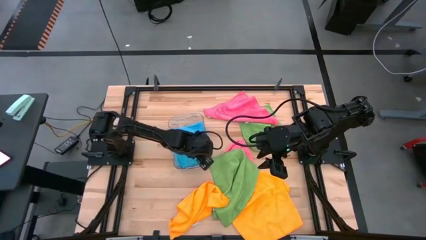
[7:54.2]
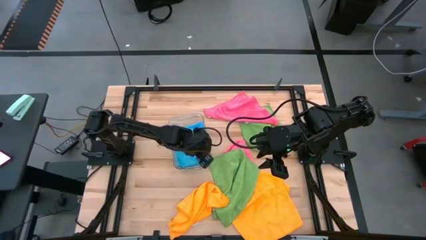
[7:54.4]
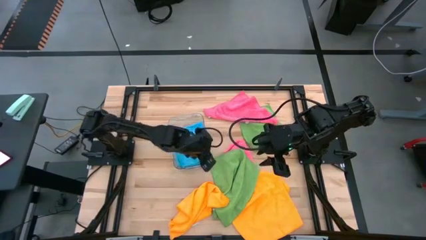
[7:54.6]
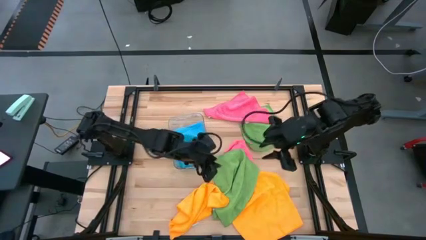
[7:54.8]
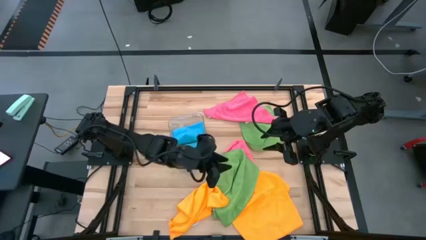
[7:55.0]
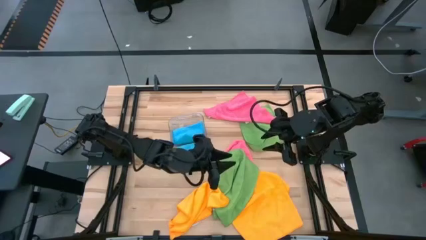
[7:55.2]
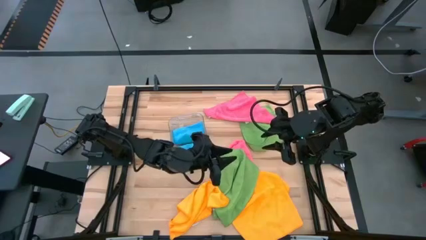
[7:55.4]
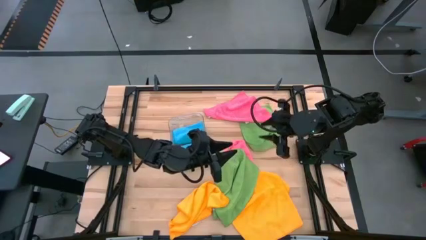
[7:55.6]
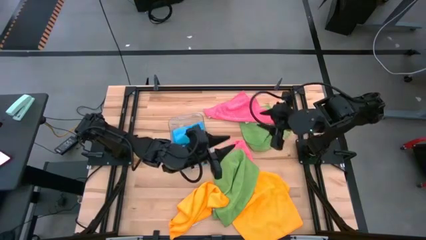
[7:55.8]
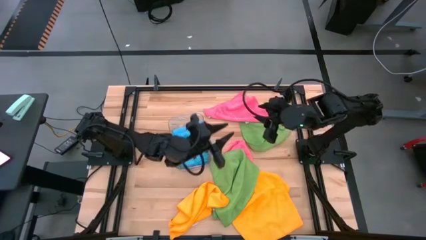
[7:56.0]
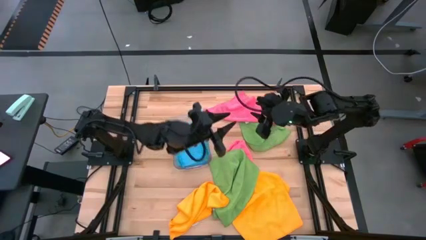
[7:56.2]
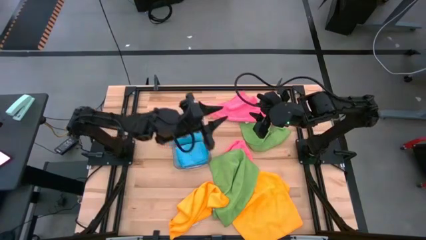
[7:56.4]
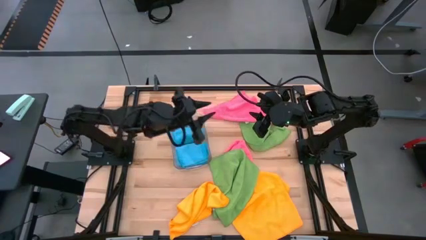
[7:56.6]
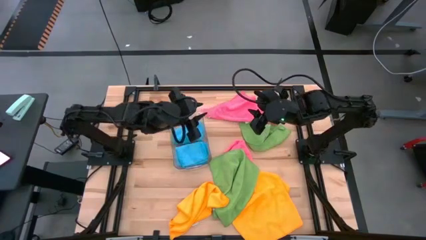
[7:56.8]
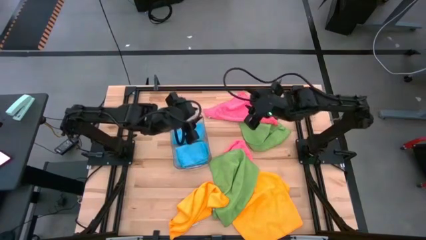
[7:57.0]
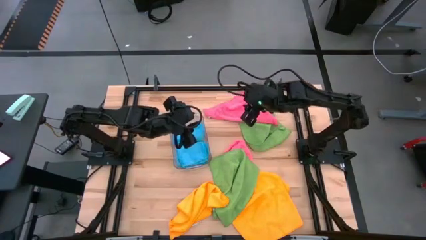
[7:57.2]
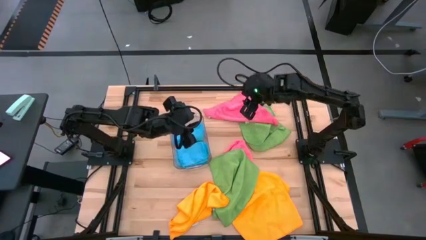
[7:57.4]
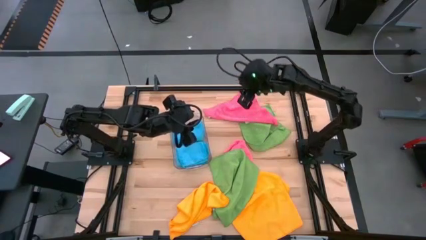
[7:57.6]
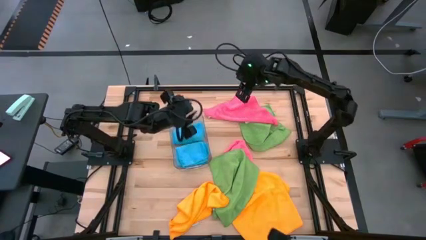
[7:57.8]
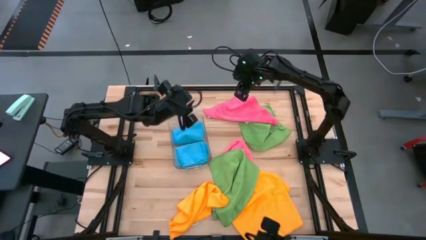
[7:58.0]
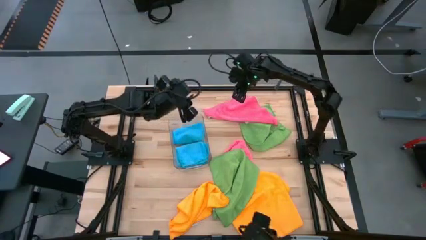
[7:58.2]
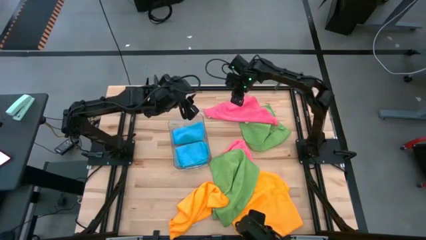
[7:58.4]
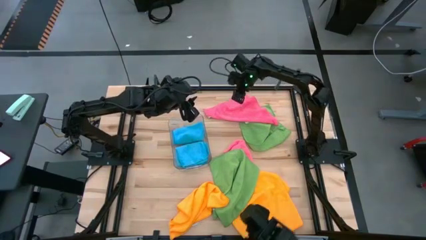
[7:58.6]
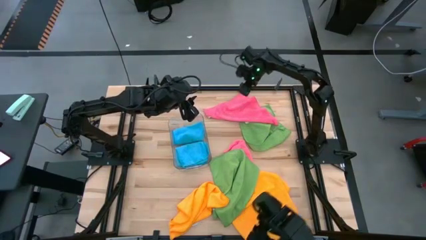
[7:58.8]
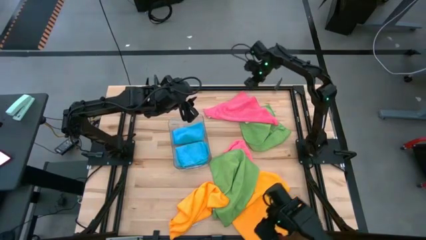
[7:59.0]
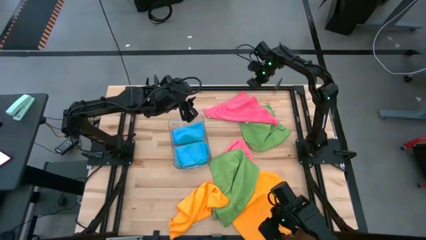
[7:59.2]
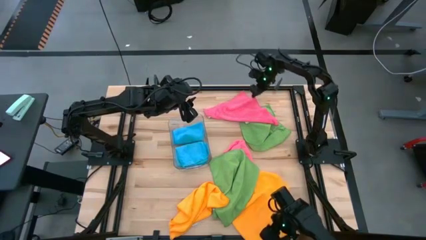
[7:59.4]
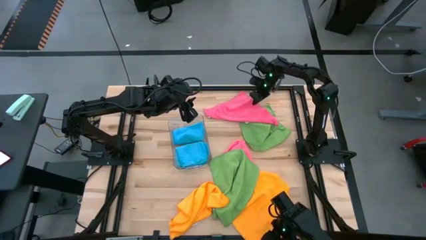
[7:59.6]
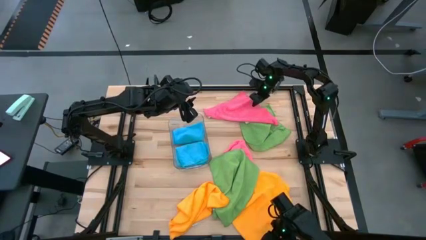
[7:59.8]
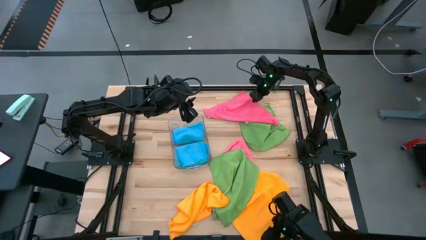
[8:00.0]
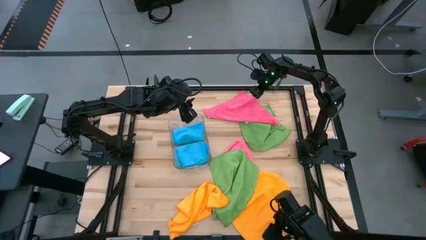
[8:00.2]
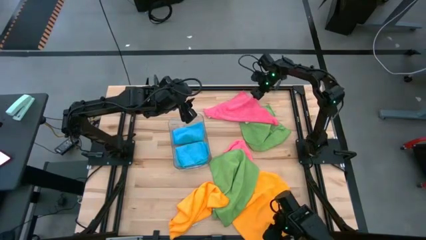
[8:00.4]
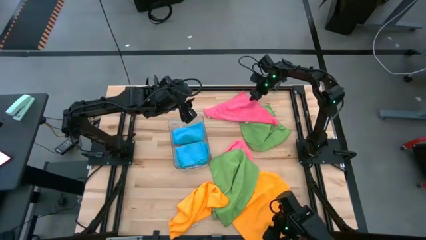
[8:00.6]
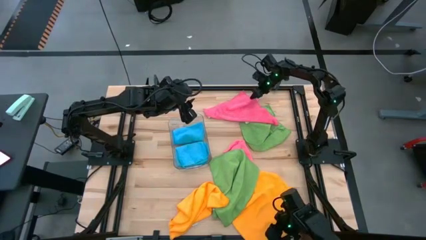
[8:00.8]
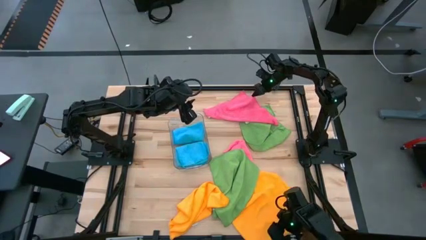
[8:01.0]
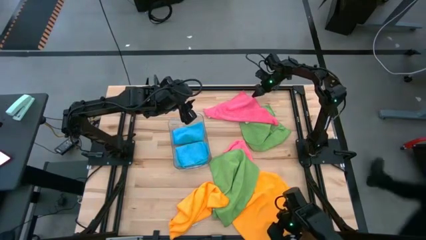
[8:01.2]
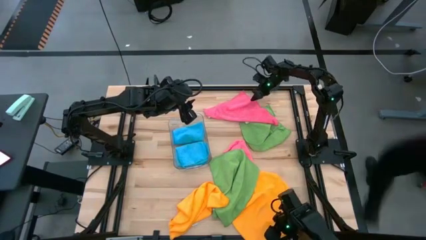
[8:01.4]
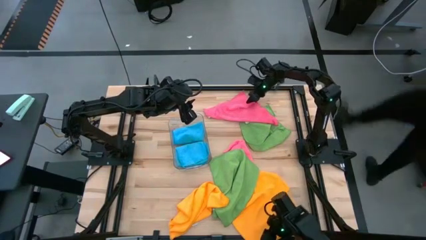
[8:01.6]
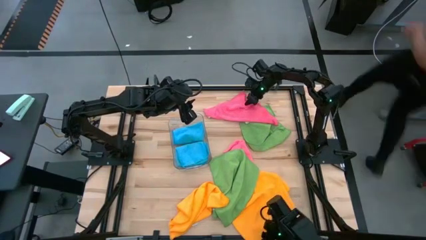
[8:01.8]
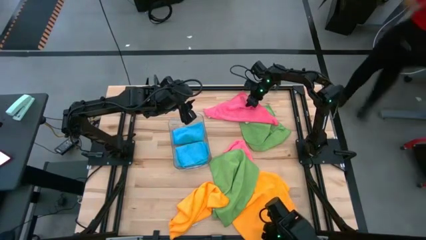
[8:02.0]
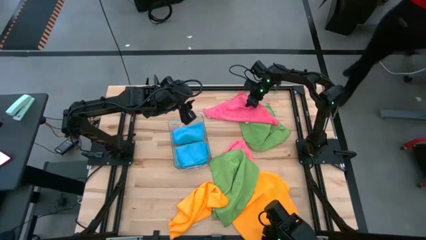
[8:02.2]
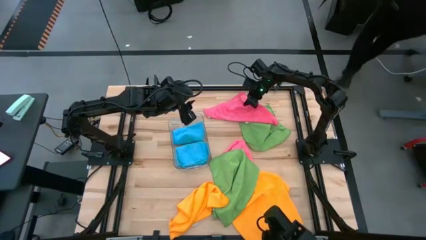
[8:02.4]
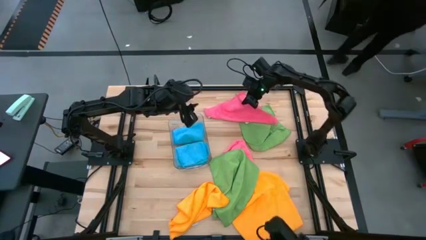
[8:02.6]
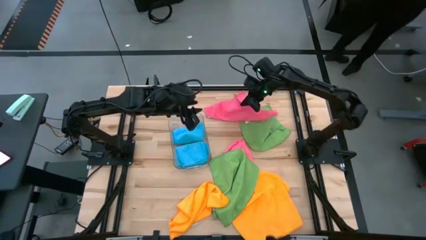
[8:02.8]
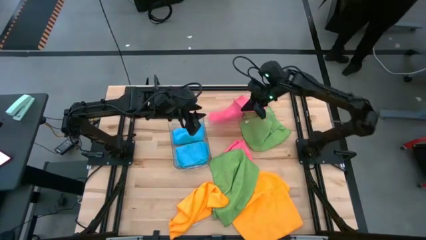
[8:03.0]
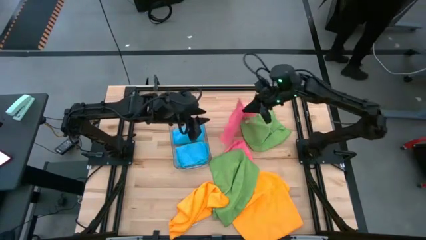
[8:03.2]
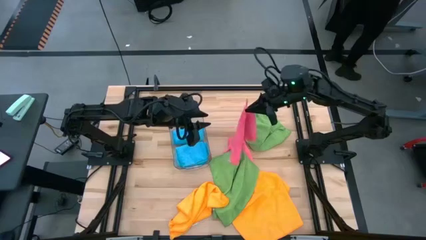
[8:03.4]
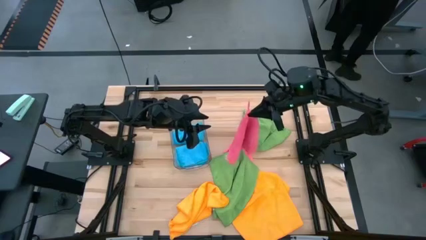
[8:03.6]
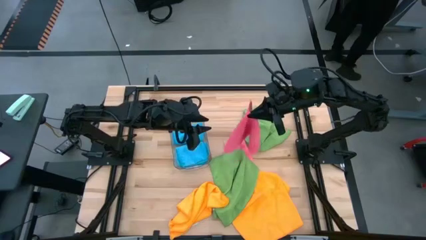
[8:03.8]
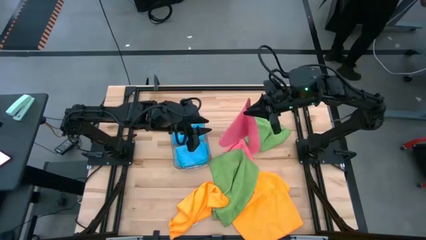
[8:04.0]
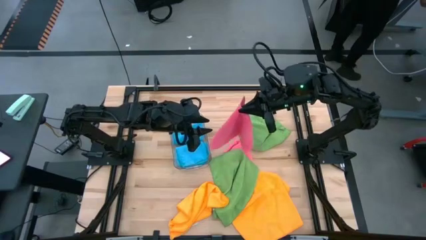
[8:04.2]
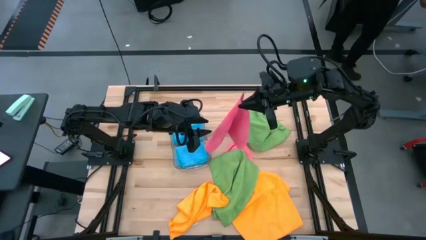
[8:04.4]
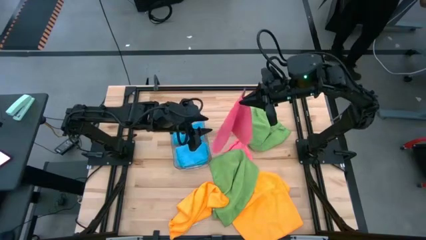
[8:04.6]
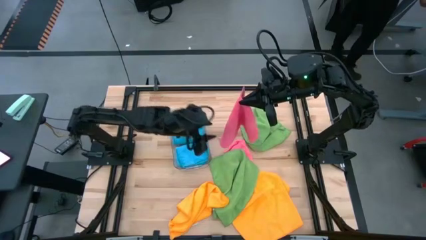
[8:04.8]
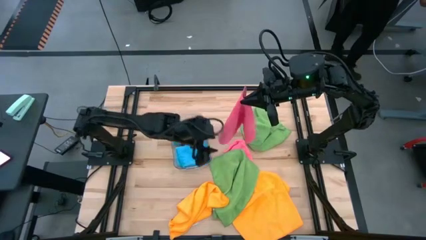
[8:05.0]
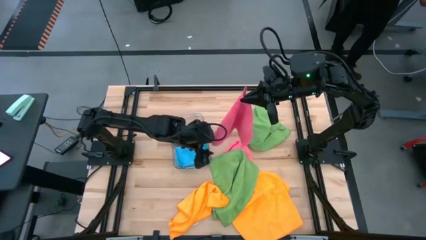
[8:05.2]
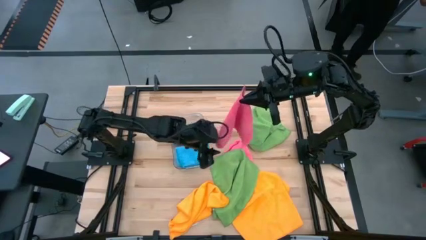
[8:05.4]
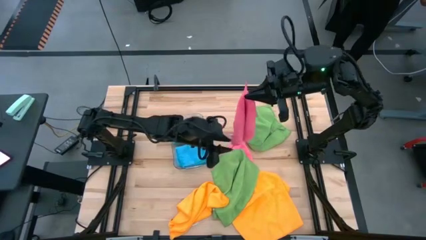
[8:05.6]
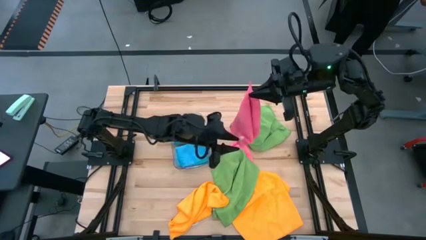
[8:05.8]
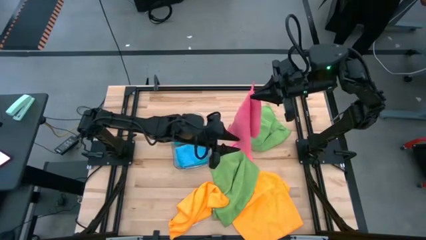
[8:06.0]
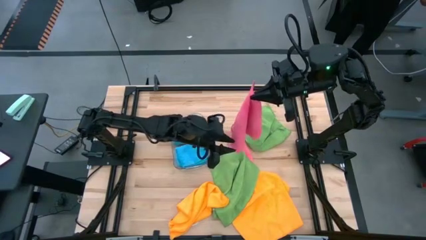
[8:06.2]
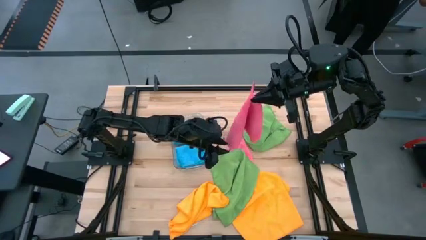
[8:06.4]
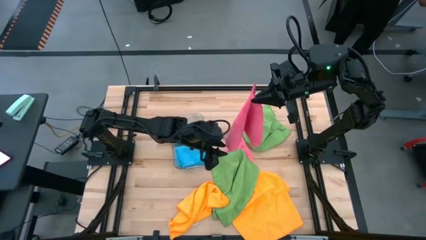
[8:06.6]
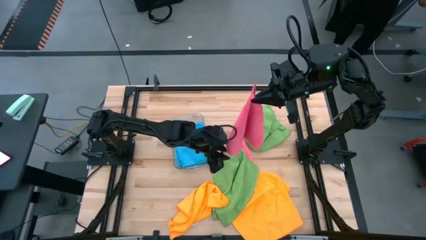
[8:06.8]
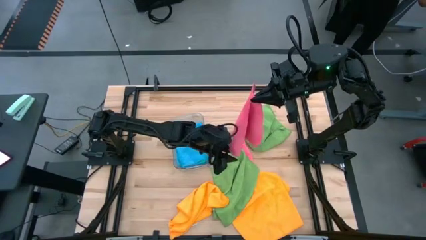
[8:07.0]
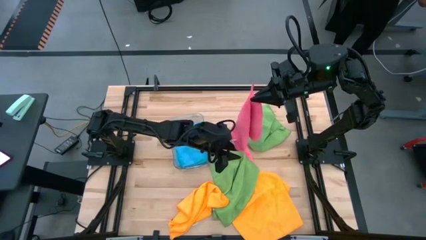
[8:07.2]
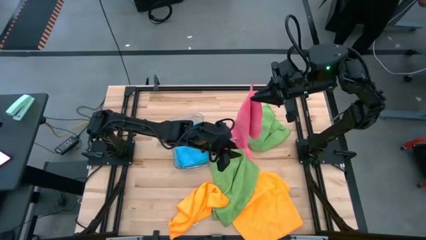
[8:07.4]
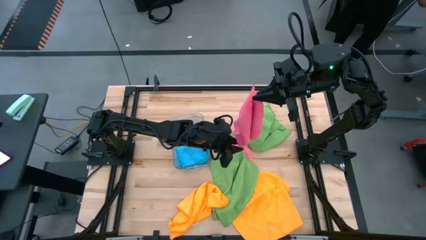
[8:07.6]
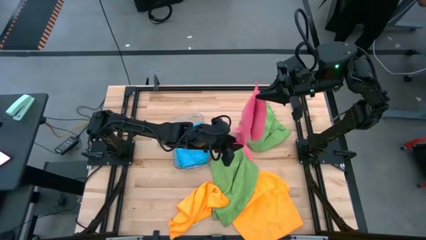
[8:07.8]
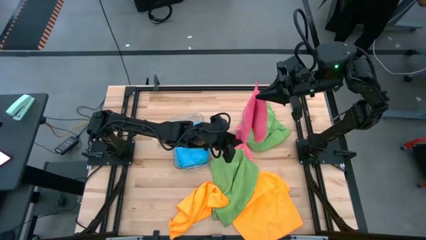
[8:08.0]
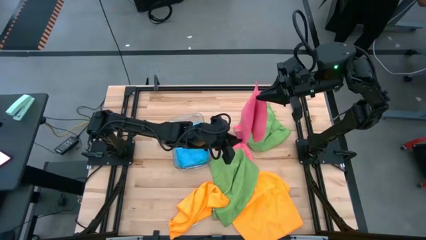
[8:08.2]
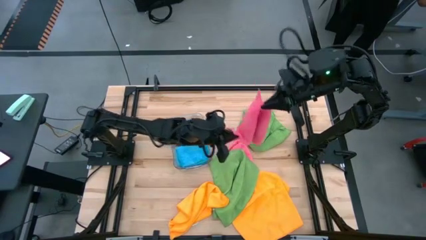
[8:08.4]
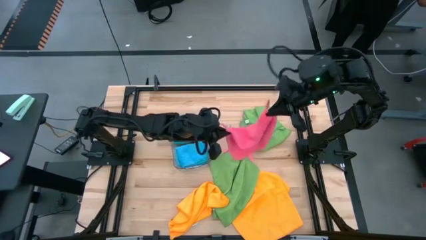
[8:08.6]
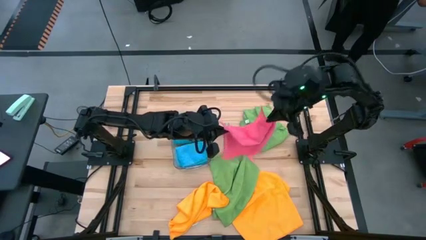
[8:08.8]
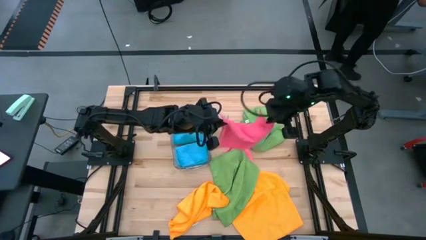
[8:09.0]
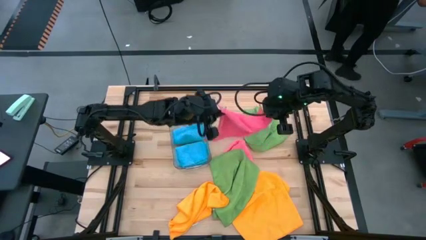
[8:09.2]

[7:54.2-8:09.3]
Task: Fold microfiber towels
Fold the top pink towel
